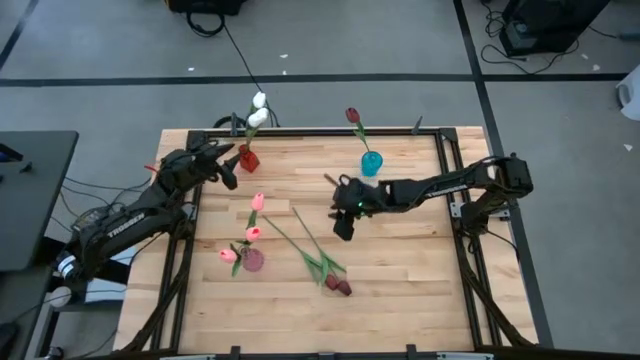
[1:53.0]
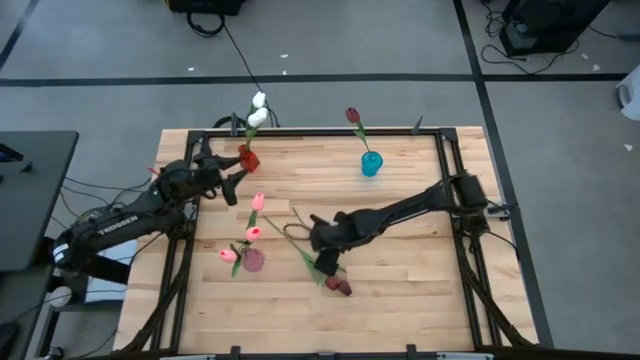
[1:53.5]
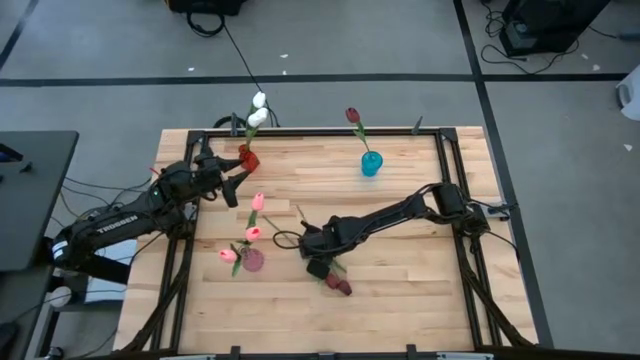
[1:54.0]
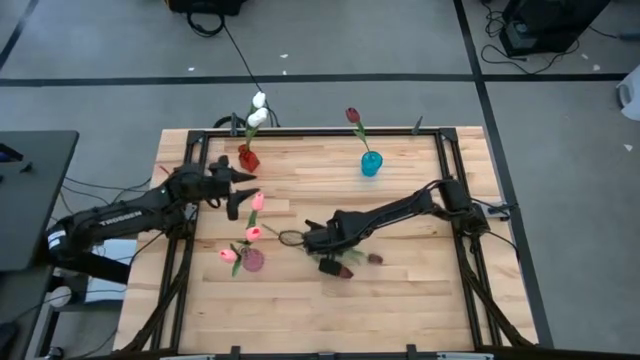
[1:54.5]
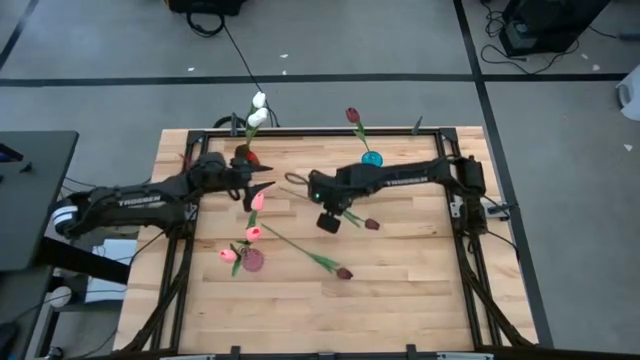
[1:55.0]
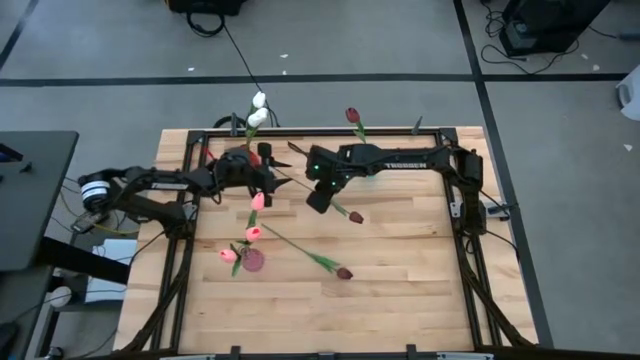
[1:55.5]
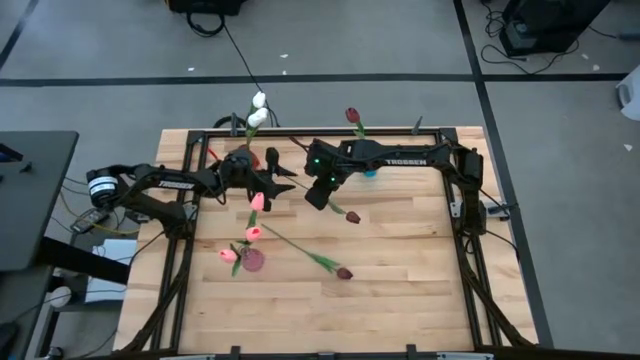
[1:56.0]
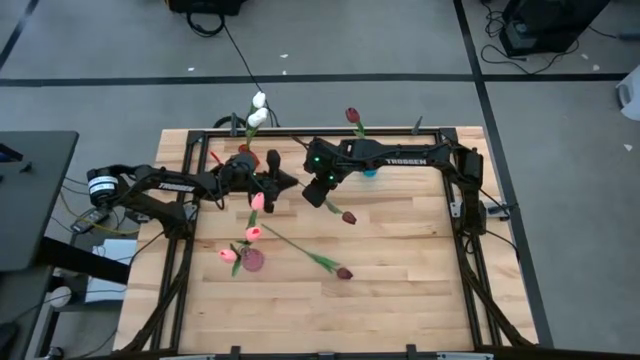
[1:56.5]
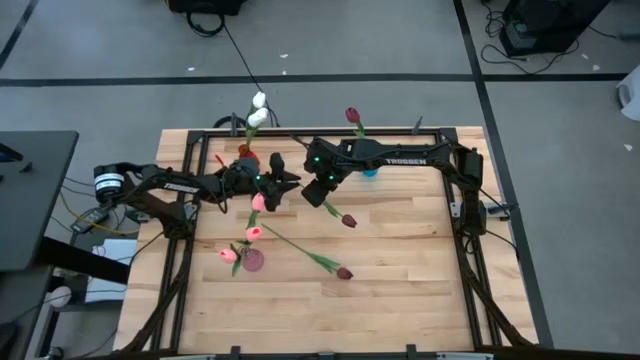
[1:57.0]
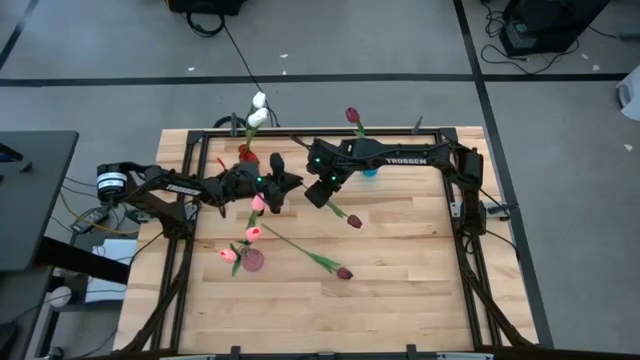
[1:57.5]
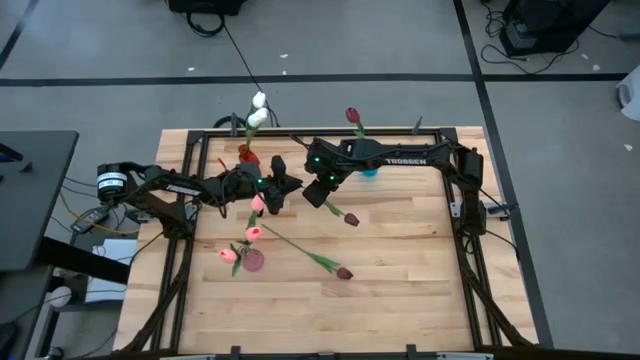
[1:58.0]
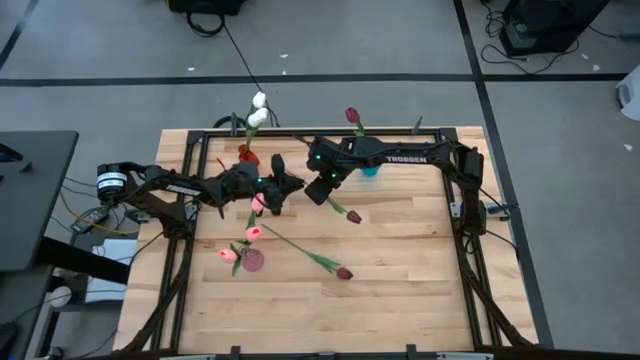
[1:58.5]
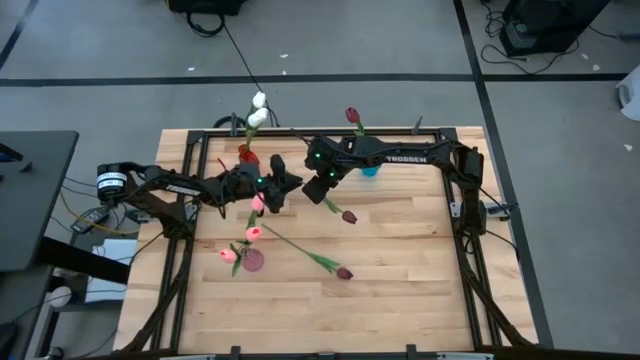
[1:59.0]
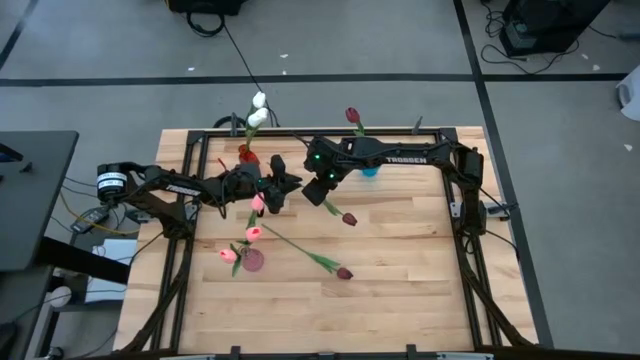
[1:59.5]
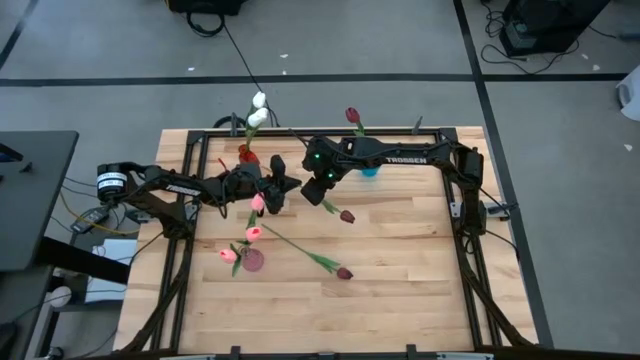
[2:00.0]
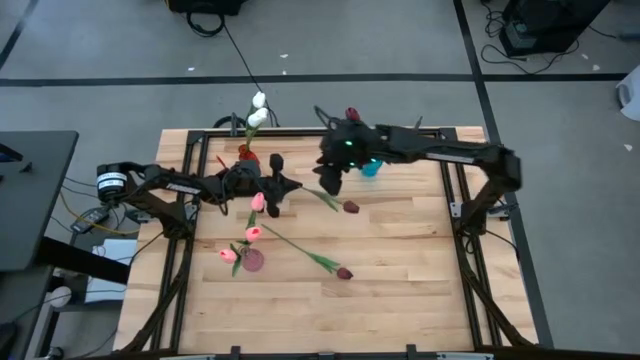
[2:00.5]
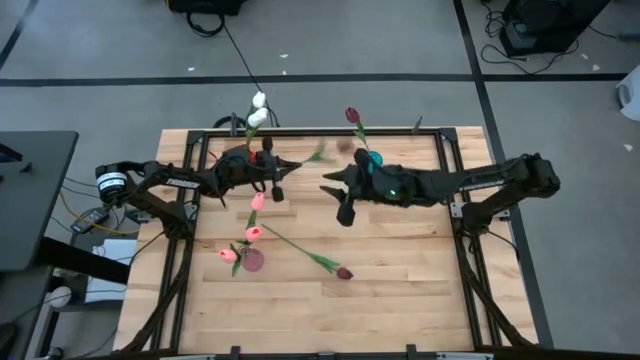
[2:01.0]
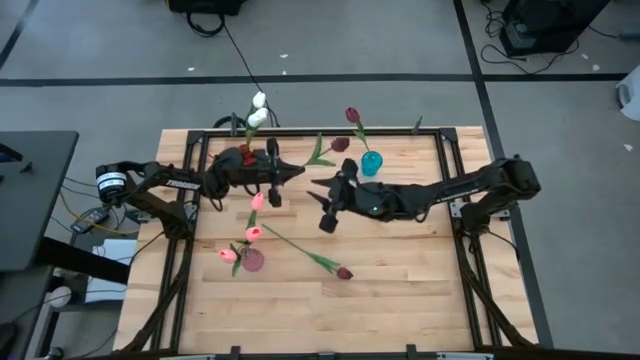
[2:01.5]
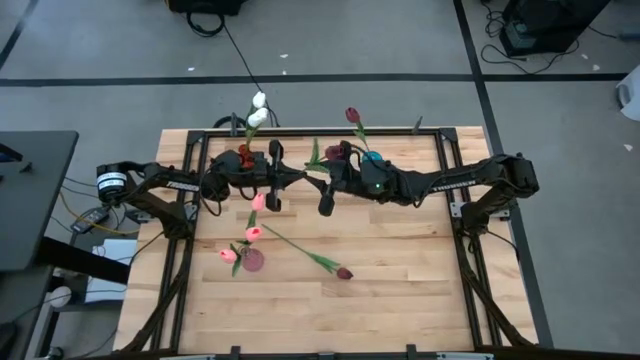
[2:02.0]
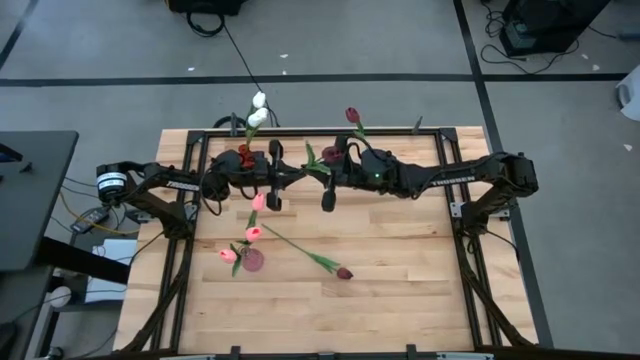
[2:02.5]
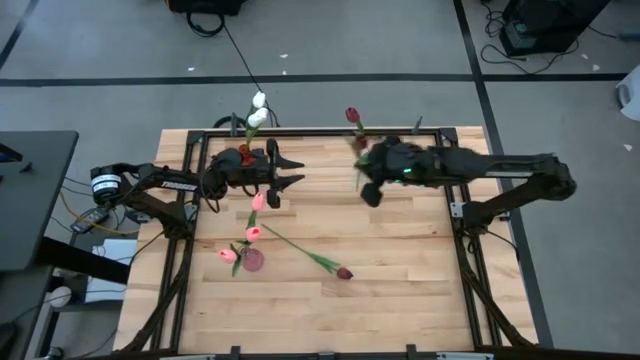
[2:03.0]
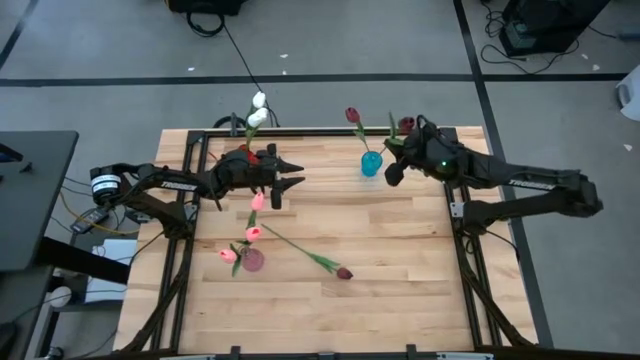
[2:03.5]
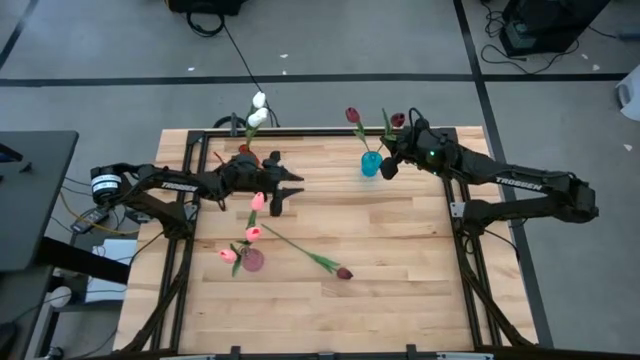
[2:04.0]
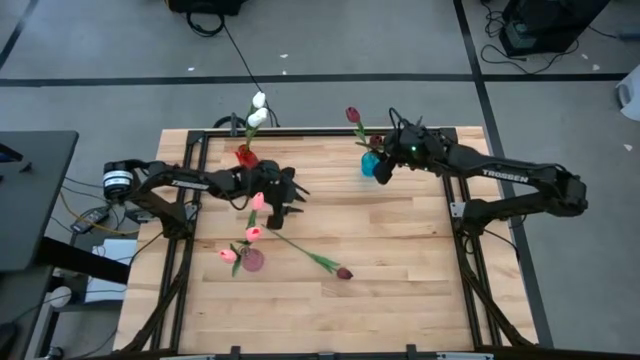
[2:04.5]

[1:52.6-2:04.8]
Task: Sort flowers into vase by color
Put the right red flower into the red vase

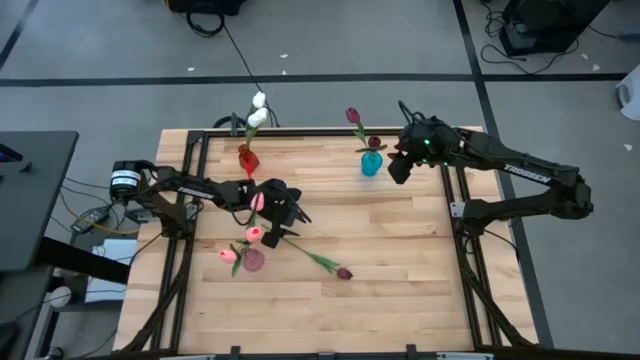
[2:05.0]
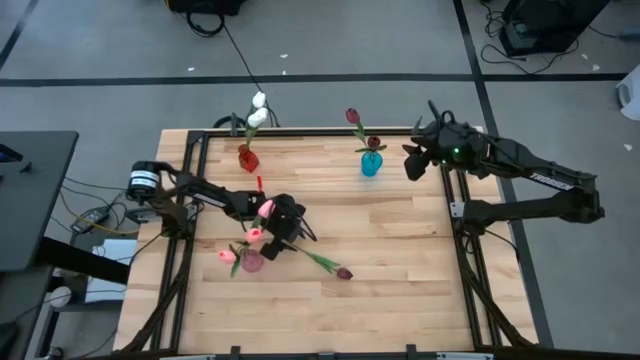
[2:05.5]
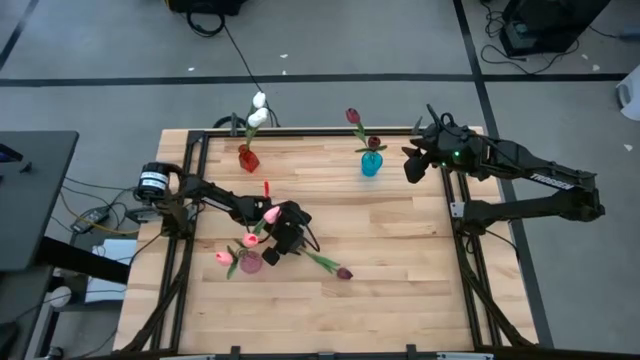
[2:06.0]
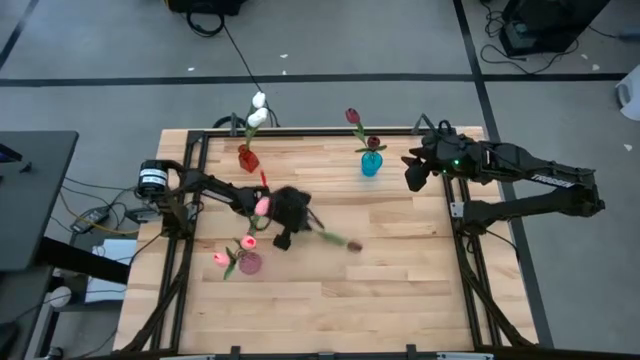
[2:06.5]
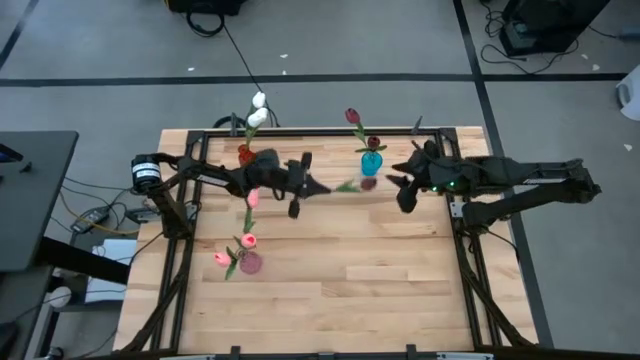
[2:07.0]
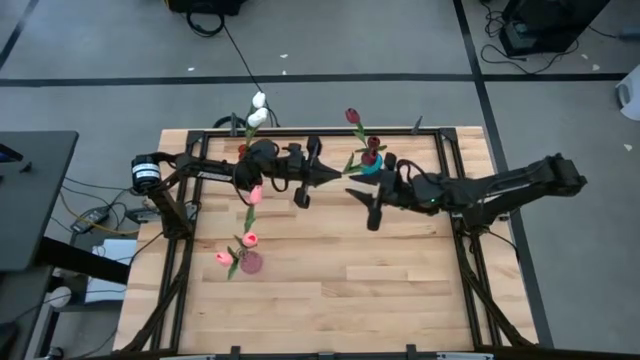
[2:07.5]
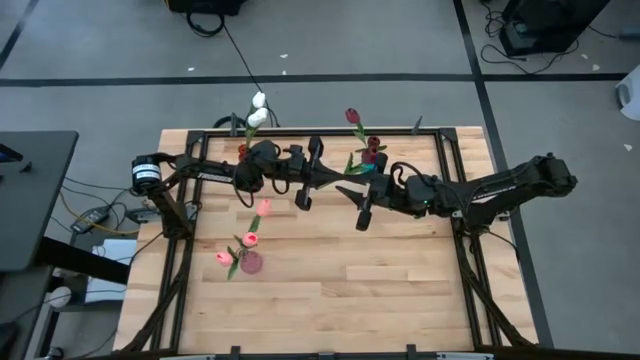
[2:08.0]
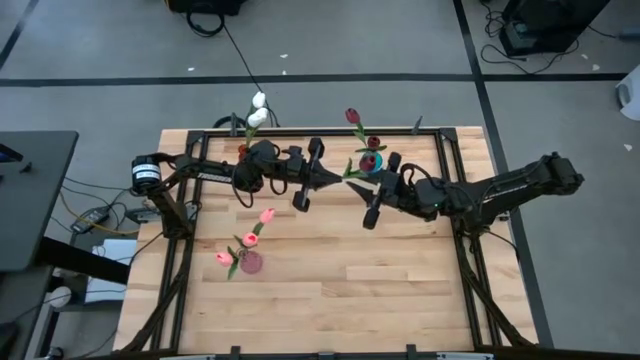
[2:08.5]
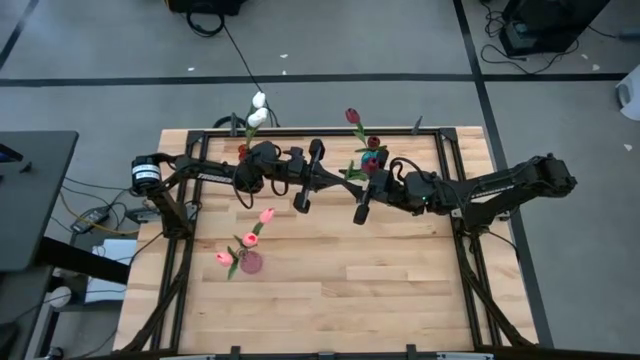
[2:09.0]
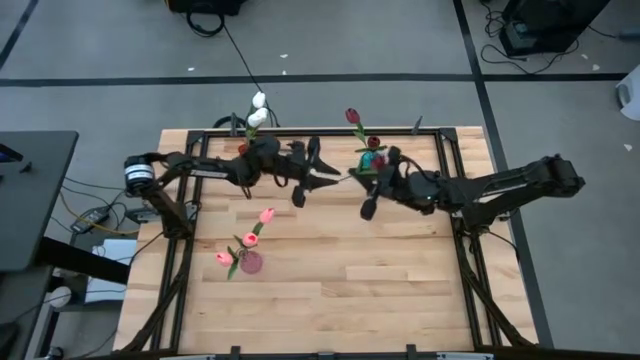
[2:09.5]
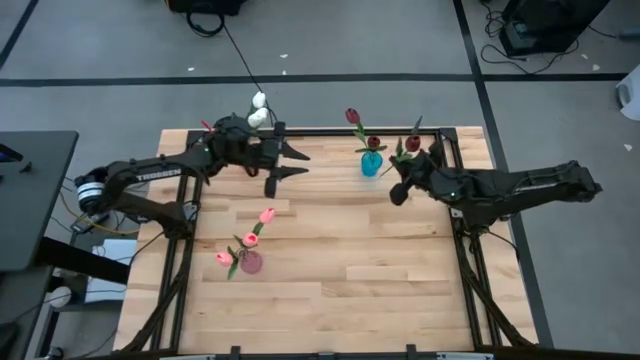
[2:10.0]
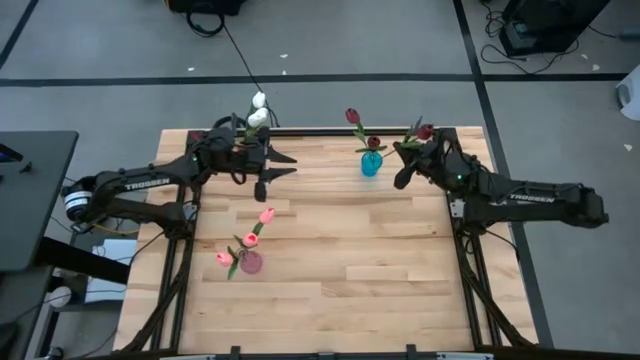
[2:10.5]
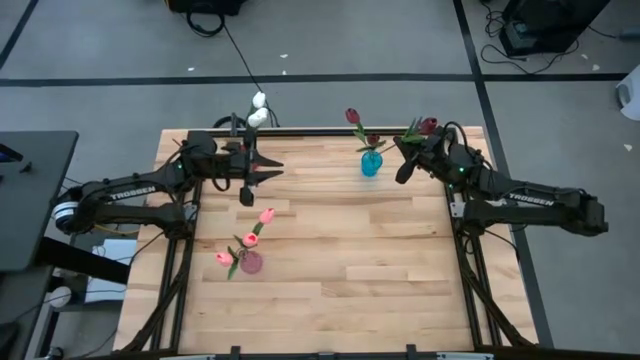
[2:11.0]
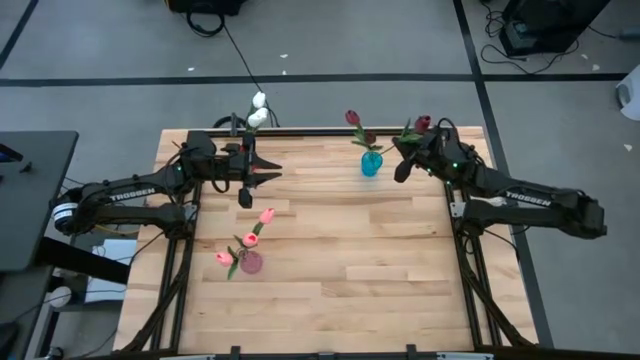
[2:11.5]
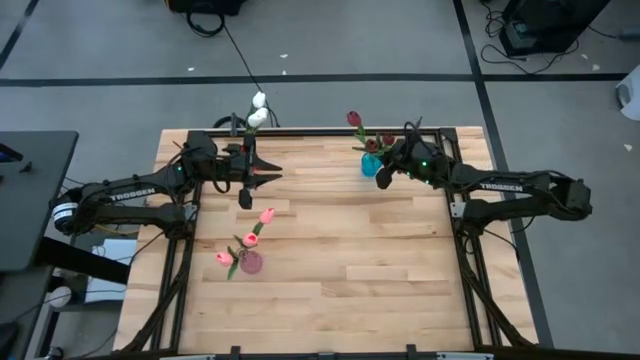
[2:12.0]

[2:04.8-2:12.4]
Put the red flower into the blue vase

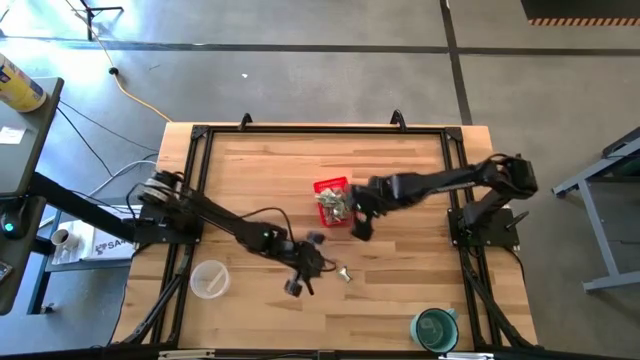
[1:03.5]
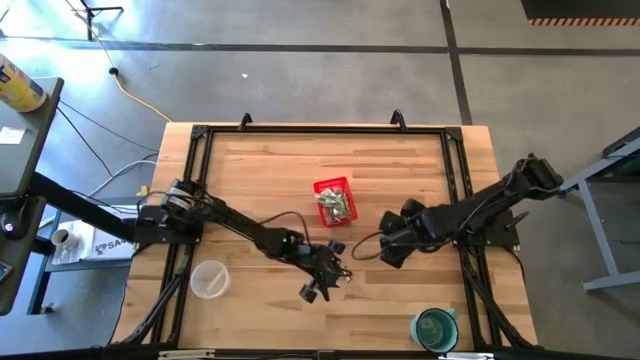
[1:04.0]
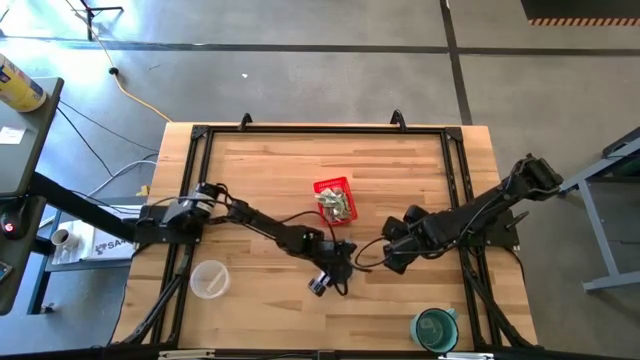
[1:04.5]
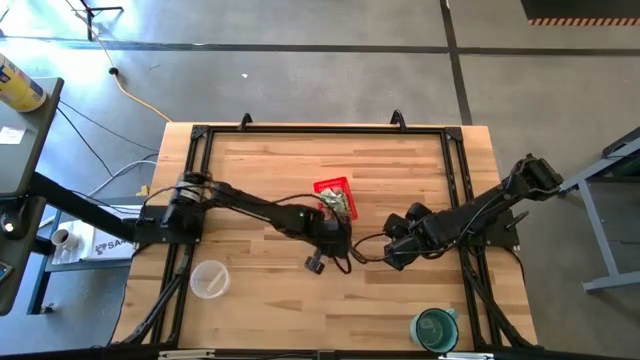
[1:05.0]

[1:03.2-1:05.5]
Task: Pick and place items into bin
Put the green truvia packet into the red bin
